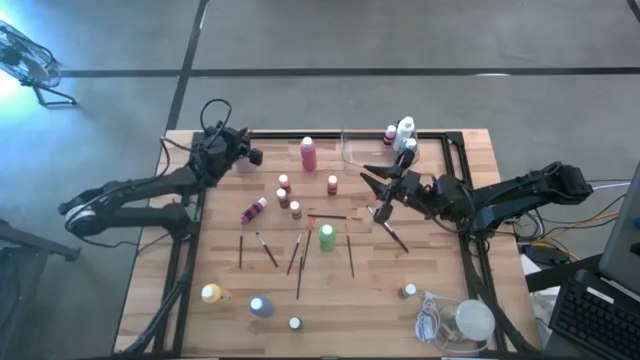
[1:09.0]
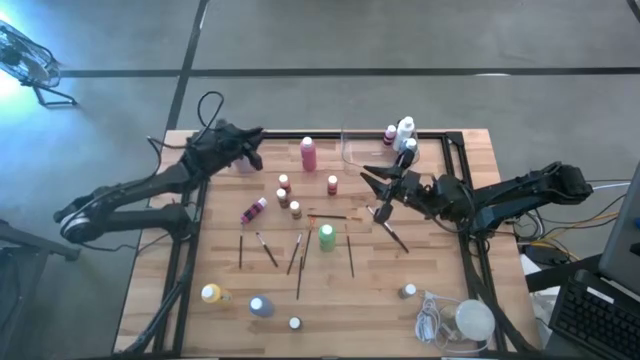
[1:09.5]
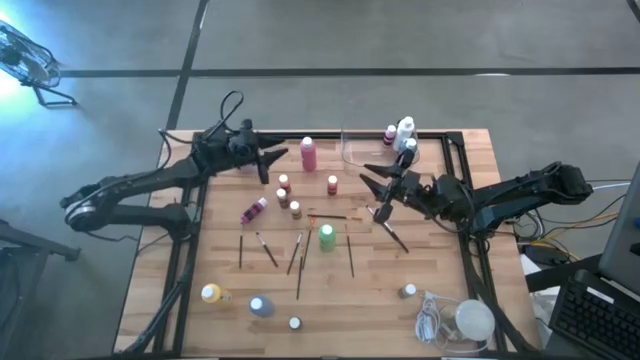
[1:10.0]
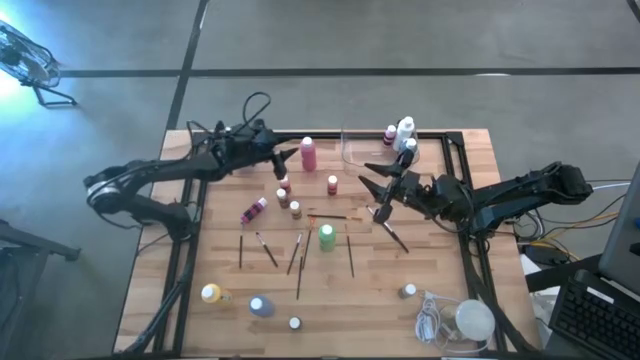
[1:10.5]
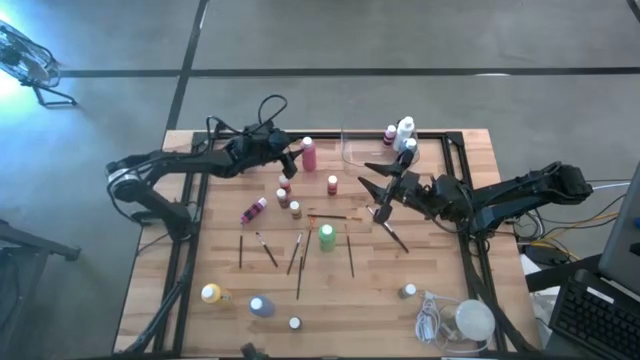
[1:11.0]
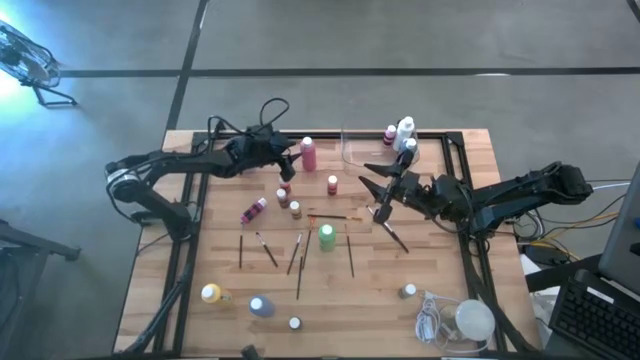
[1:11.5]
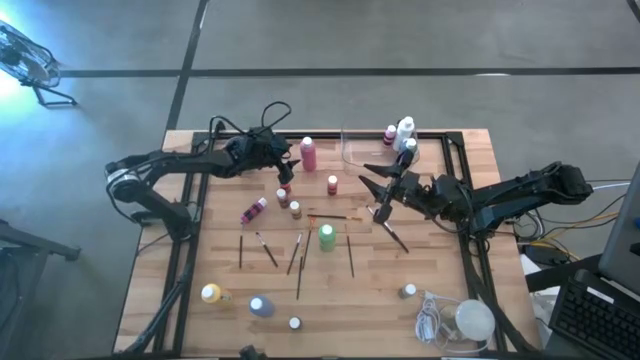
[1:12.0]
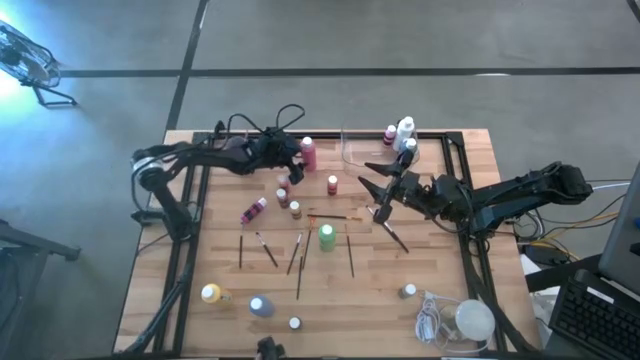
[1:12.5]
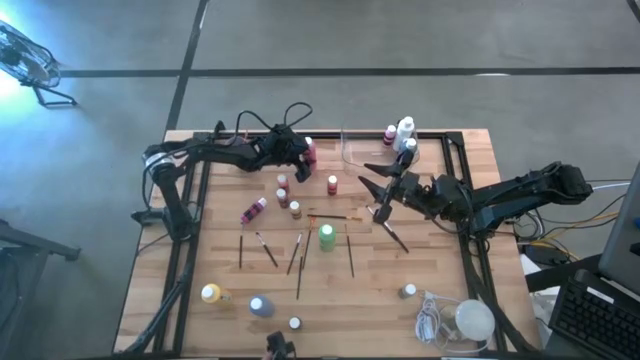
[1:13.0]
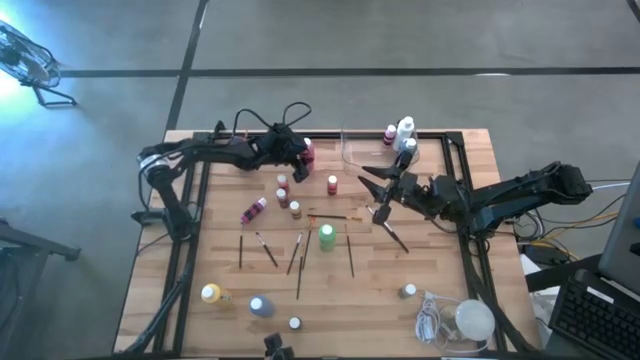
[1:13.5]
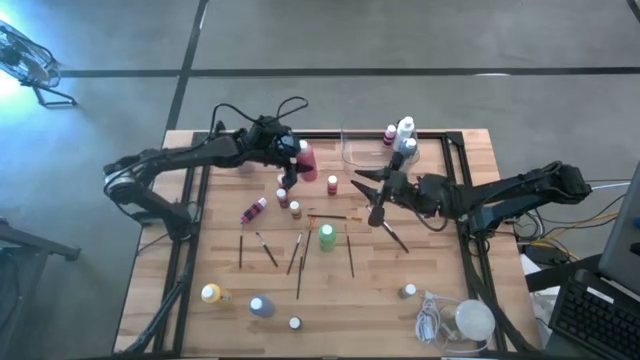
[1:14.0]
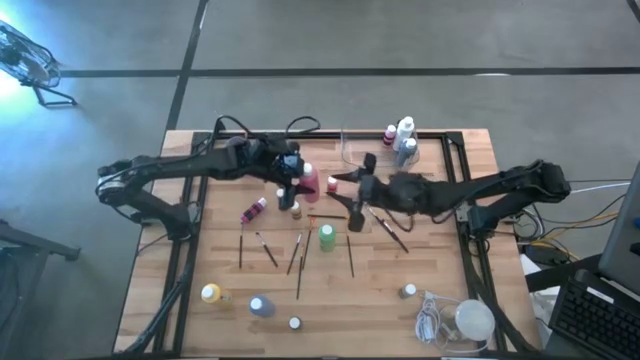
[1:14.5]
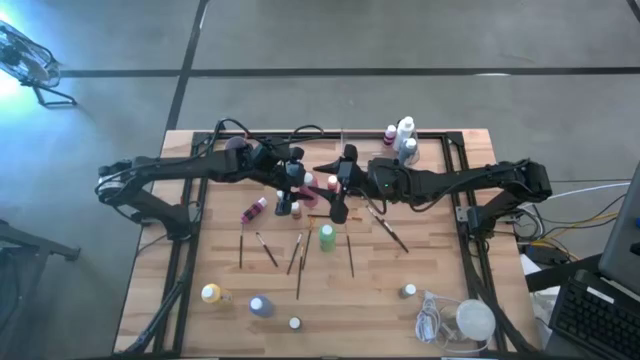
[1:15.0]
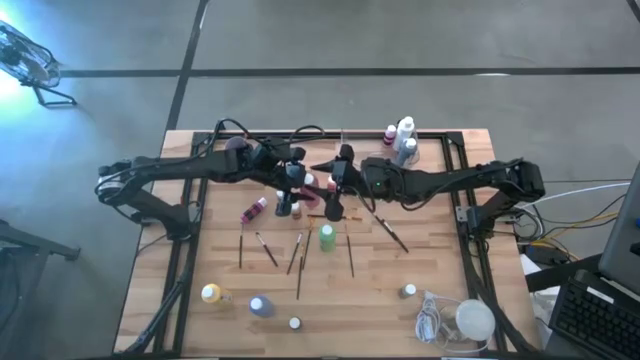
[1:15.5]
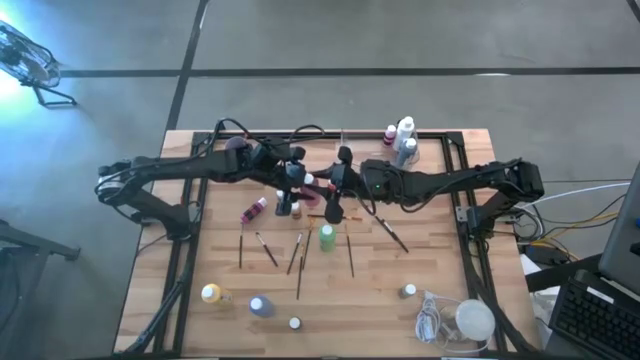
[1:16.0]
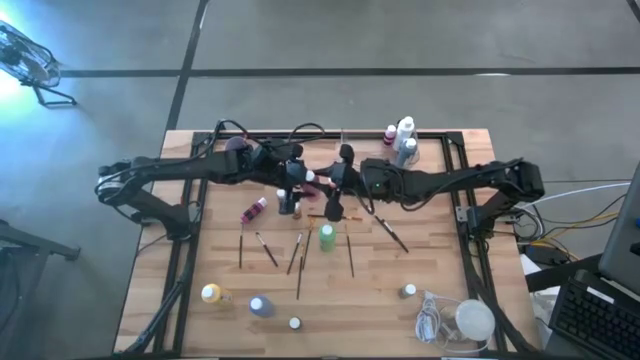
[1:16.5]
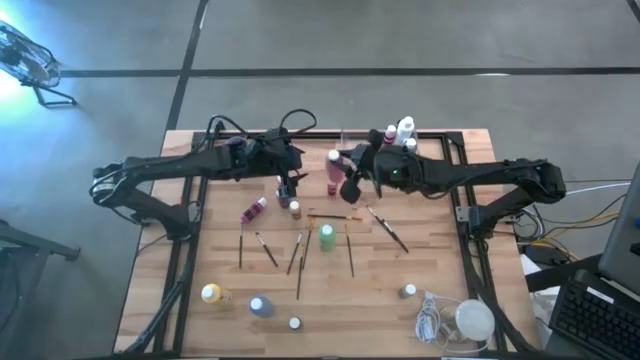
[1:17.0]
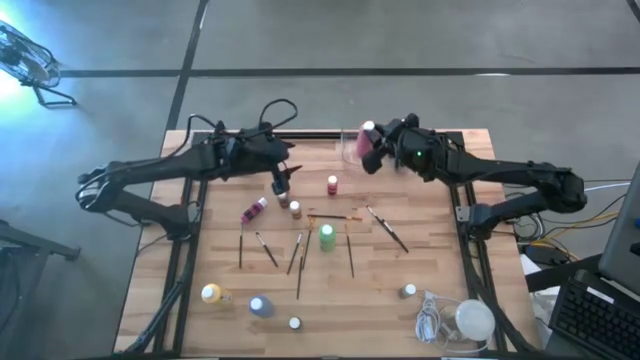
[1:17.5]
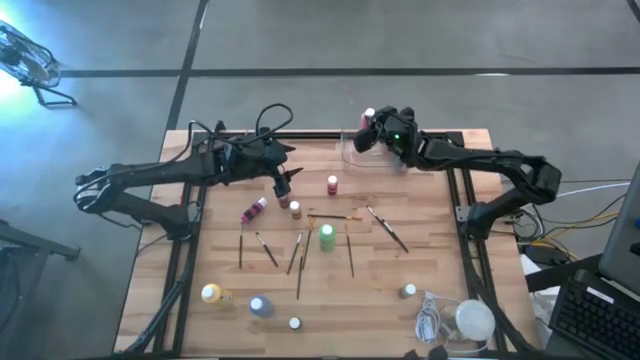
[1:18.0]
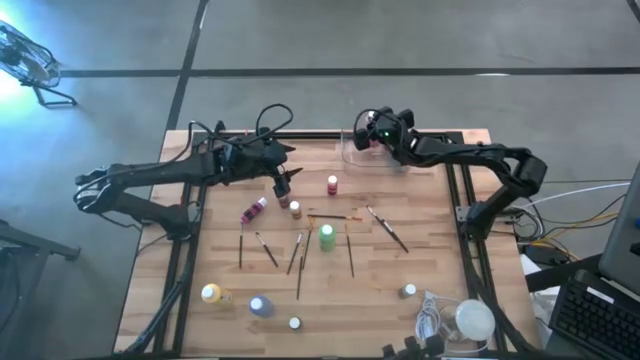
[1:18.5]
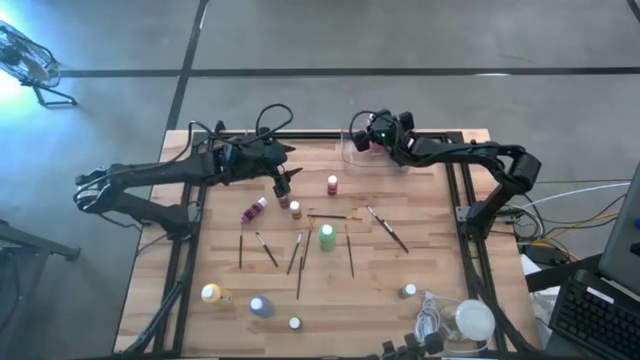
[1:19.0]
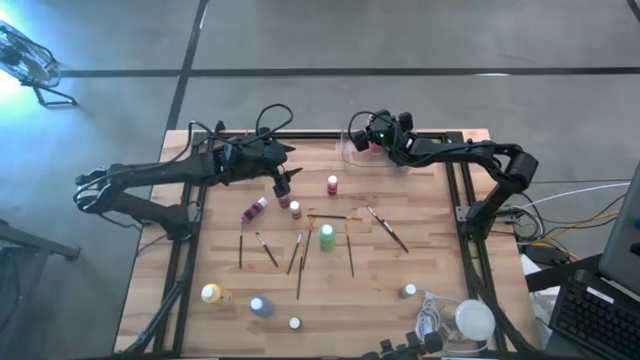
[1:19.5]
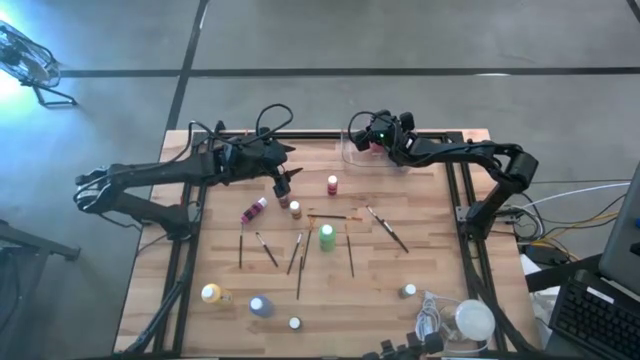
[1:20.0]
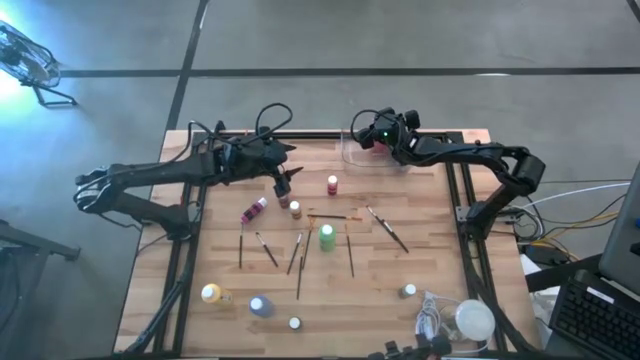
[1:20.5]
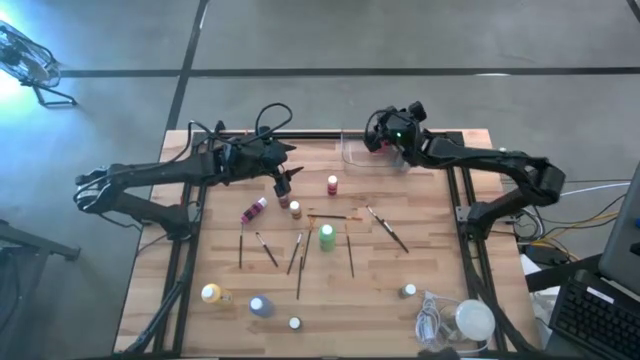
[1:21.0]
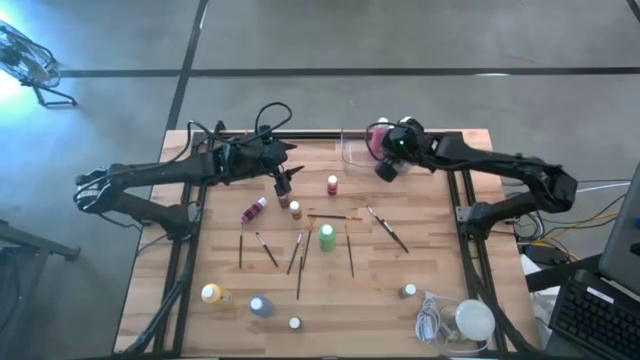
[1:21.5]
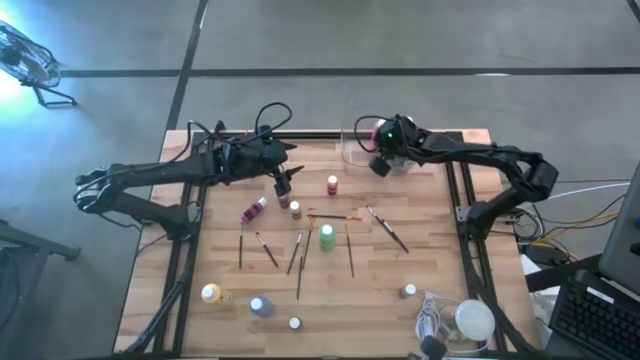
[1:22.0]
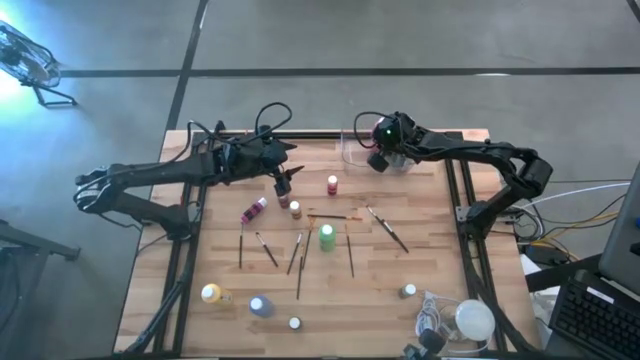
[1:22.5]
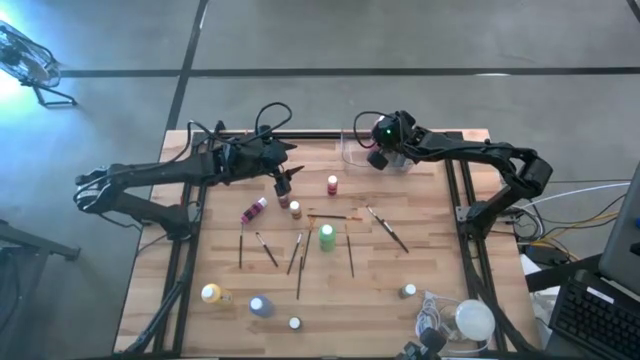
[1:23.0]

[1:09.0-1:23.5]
Task: Pick & Place Paint Supplies
Put the pink paint bottle into the transparent bin
